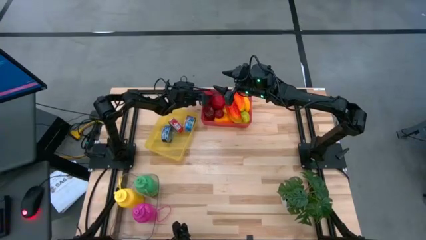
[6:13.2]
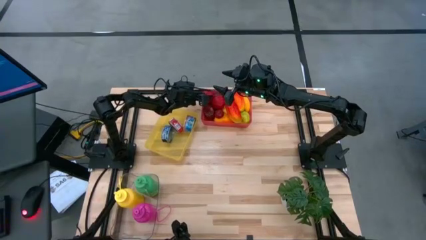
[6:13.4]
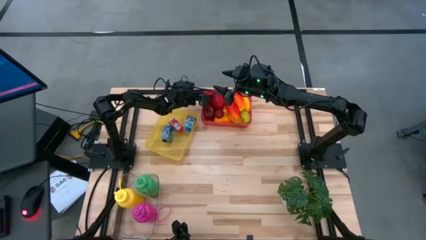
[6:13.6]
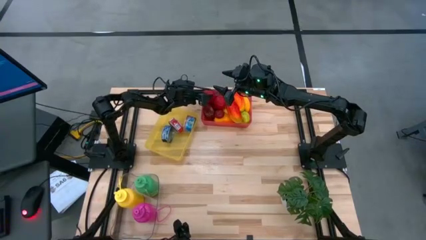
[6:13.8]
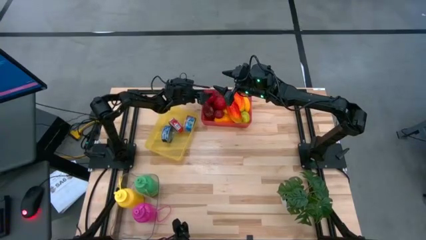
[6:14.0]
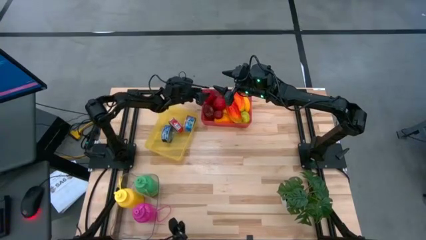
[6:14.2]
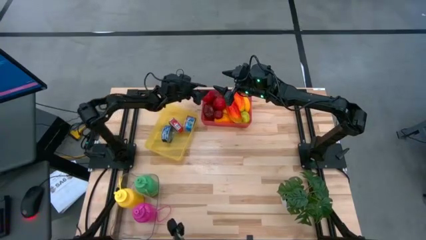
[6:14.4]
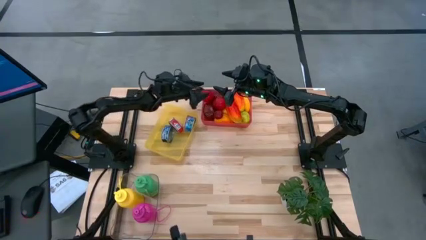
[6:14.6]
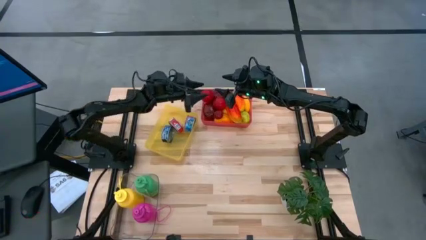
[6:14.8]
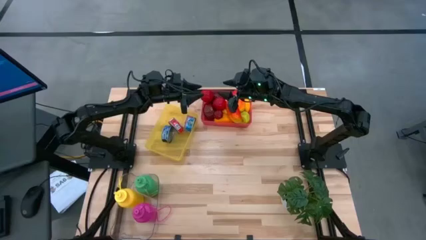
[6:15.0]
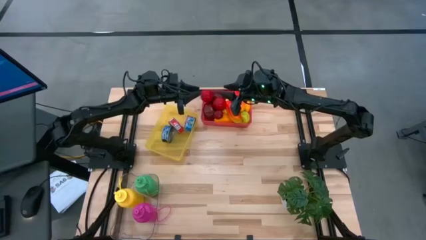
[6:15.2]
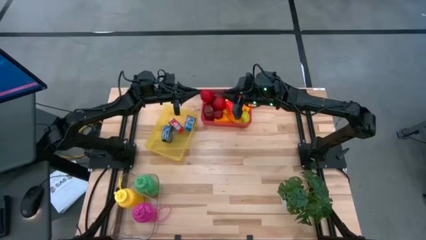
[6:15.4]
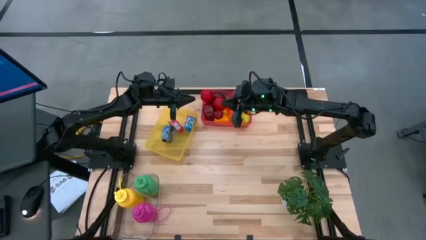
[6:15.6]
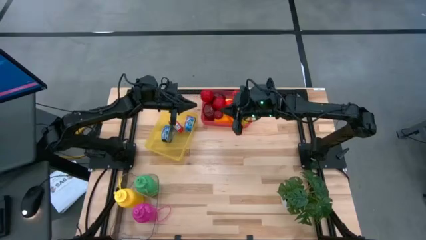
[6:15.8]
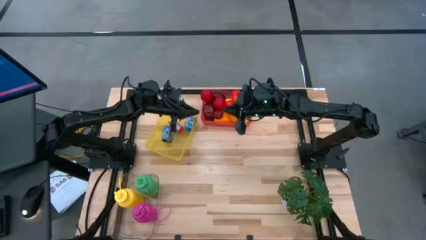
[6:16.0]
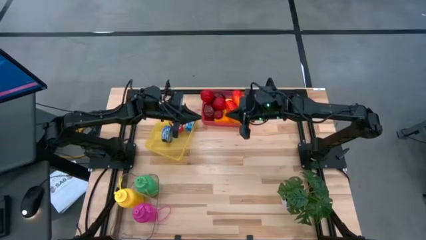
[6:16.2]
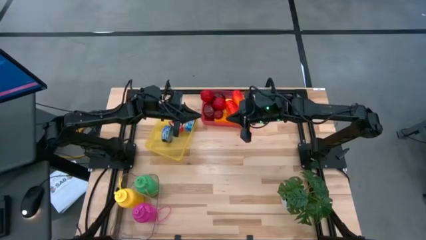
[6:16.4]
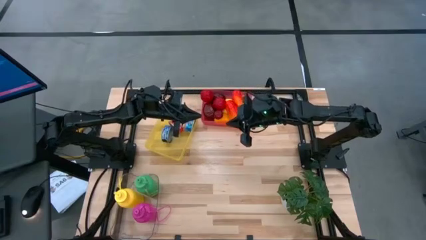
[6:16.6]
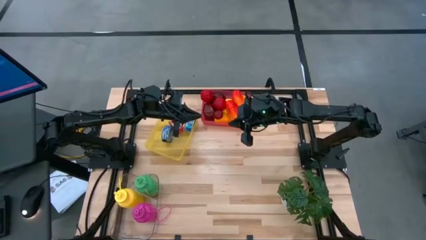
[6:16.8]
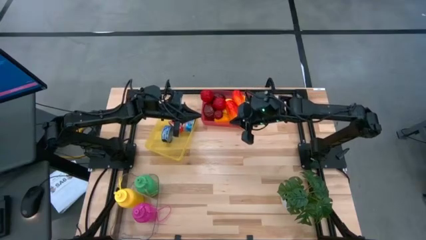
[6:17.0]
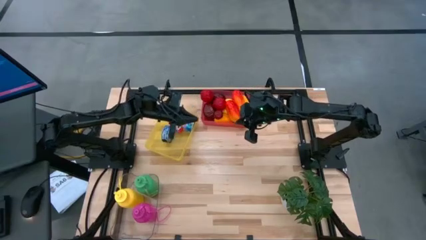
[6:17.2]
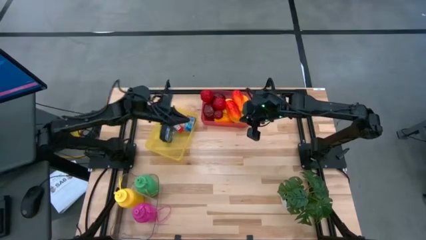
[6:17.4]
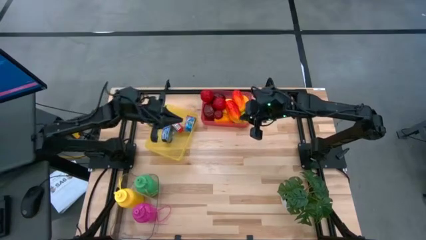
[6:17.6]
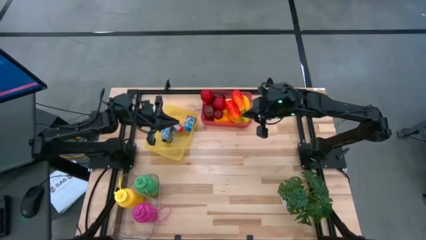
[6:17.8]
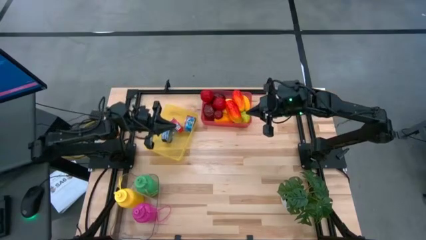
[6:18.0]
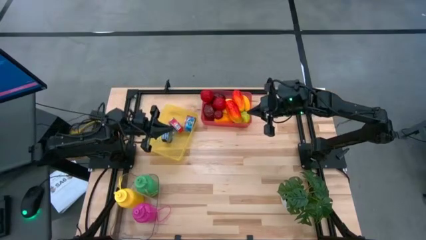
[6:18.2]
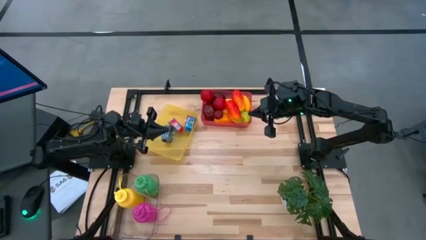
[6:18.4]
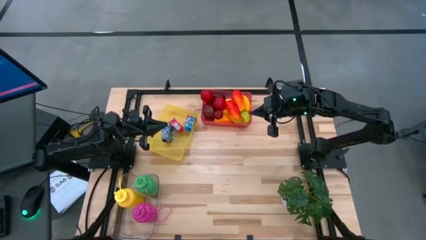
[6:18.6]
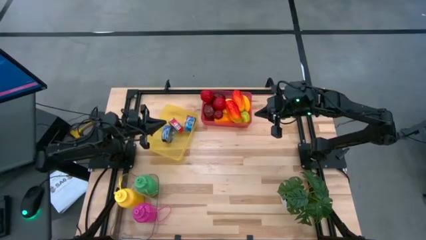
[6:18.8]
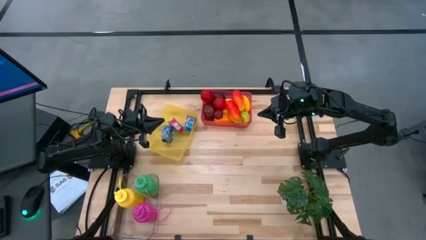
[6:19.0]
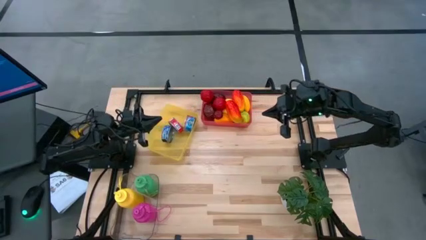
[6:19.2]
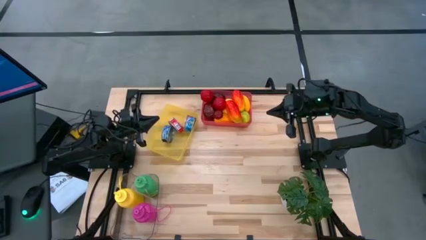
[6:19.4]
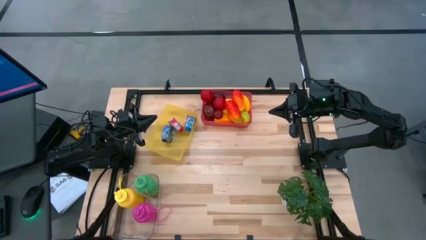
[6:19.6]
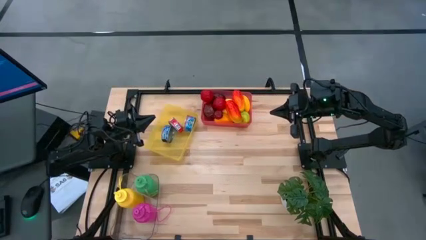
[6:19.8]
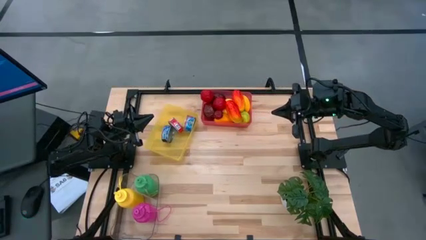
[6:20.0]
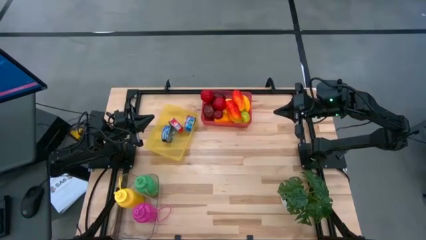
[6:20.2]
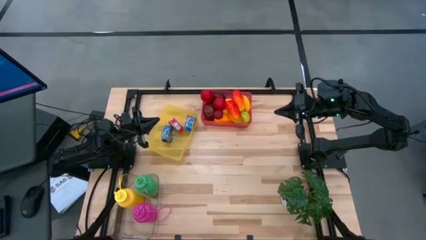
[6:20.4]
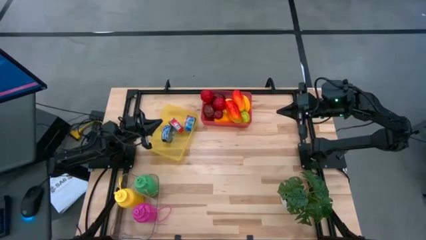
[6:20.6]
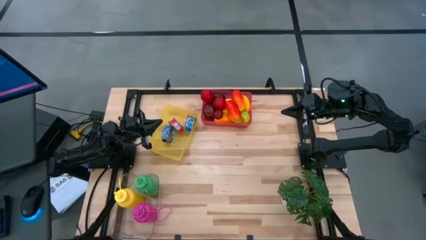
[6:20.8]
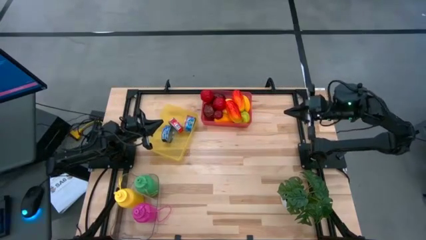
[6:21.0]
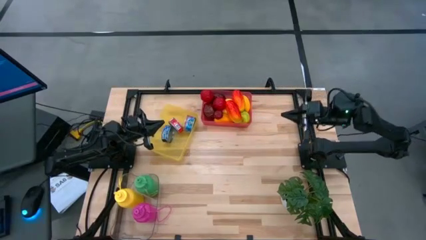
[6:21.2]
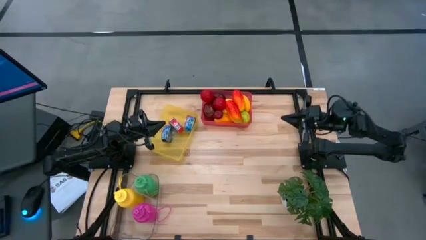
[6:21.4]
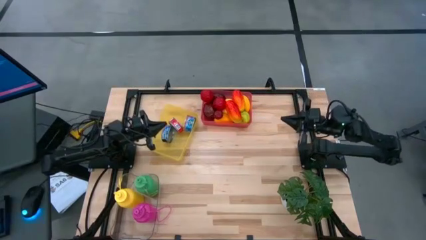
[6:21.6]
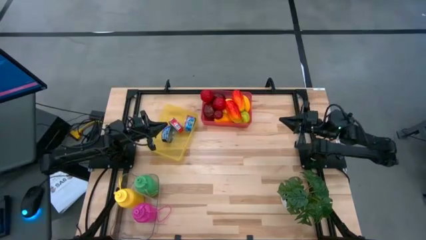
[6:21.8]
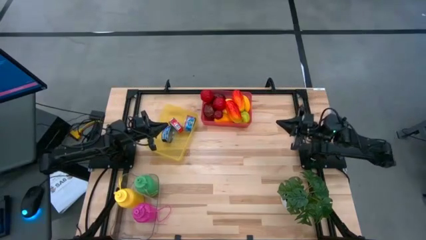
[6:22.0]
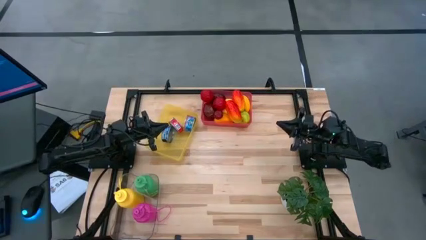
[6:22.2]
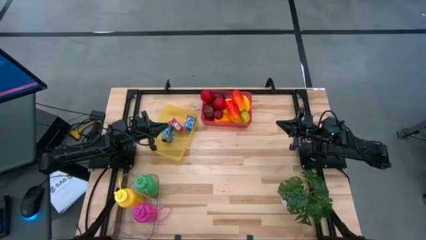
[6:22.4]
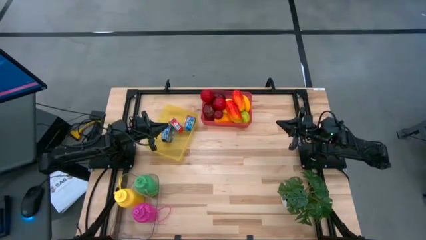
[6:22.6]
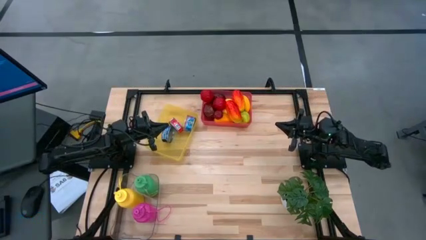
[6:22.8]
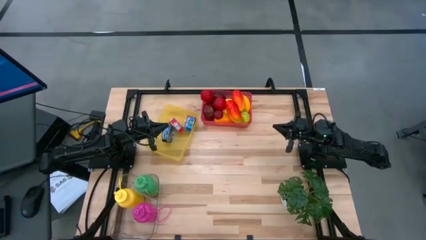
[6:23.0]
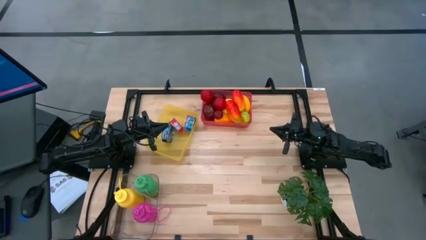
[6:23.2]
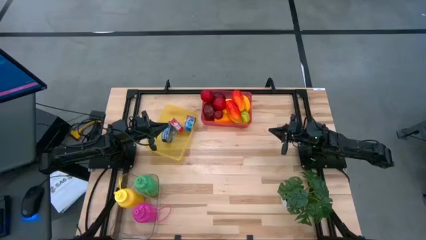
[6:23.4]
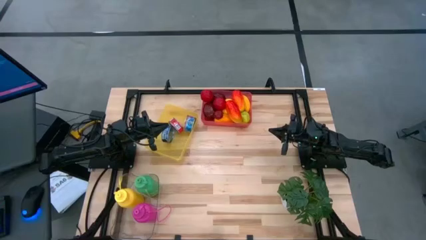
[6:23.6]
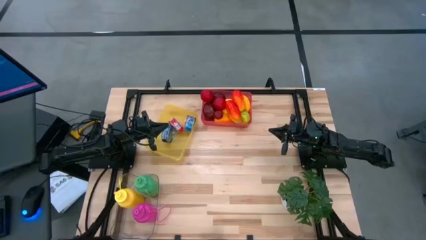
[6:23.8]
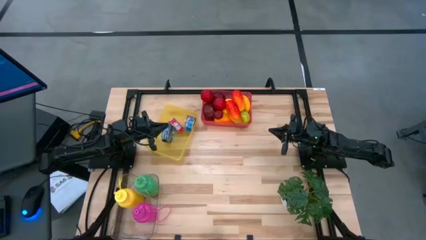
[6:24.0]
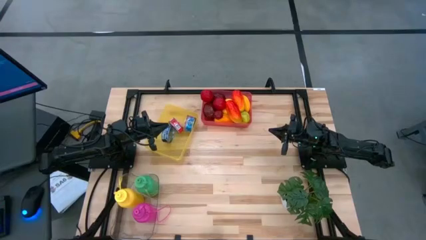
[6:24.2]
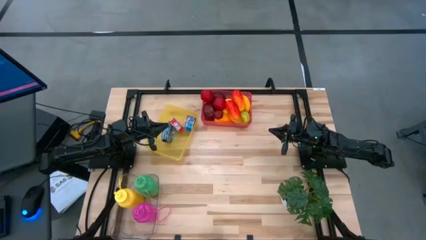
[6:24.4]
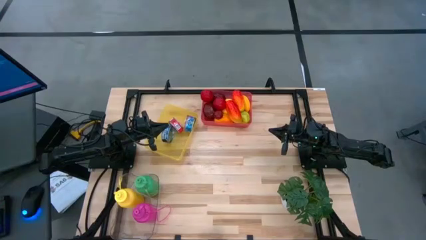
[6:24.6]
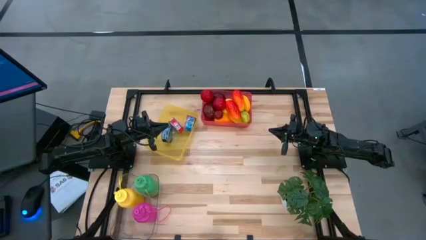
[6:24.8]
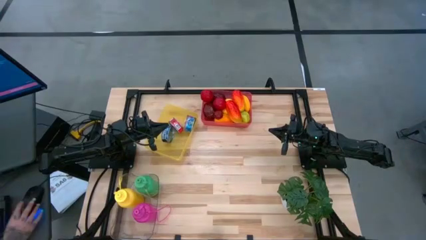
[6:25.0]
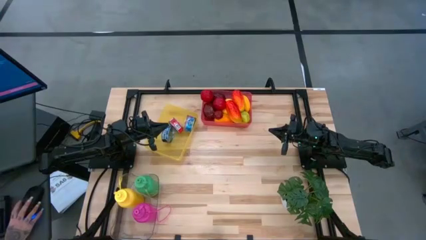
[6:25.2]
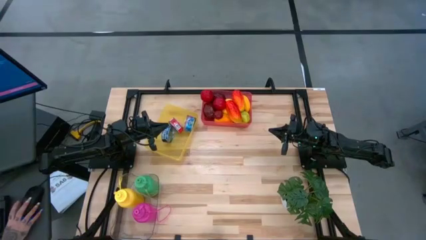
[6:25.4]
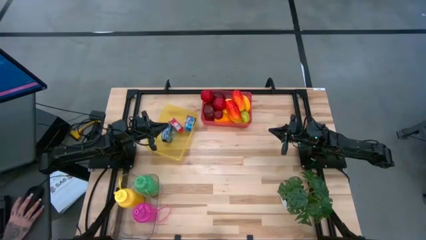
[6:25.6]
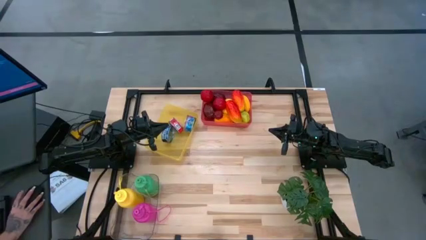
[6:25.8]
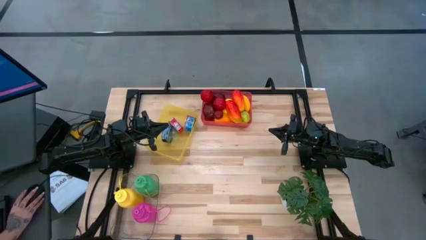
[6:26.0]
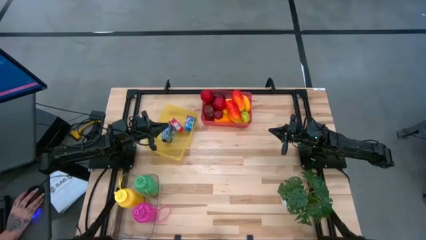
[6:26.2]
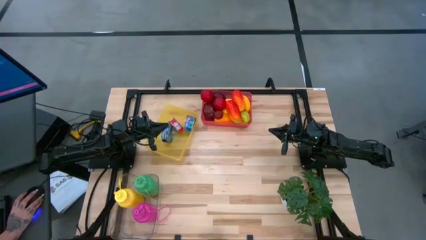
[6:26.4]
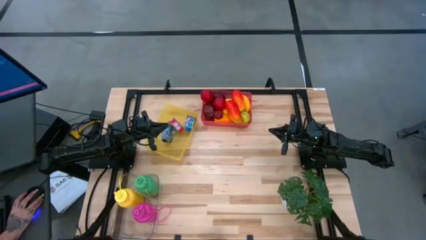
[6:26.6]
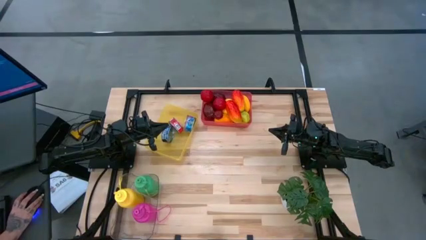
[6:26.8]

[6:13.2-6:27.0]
Task: Pick & Place Food Item
Return to Home Position
